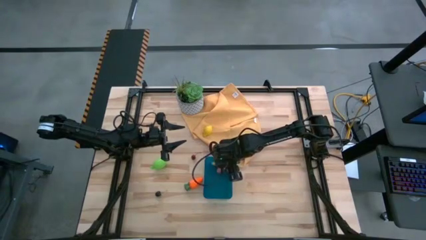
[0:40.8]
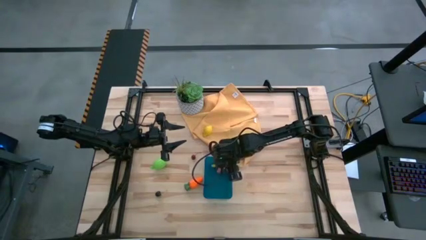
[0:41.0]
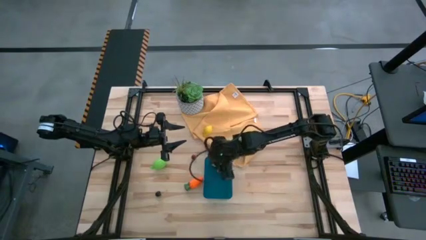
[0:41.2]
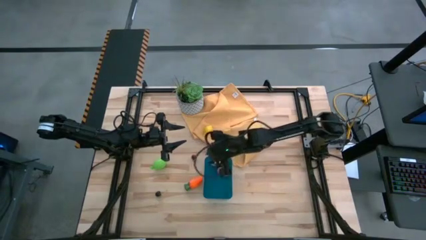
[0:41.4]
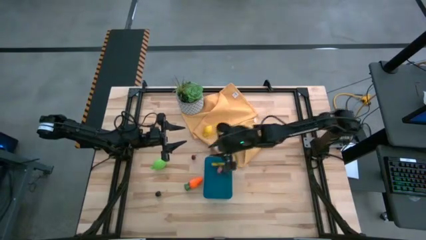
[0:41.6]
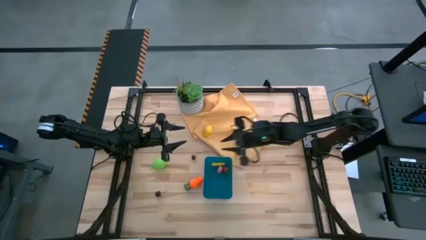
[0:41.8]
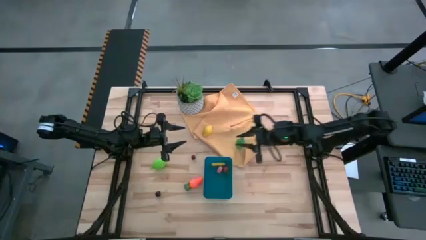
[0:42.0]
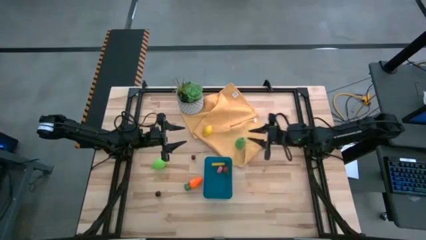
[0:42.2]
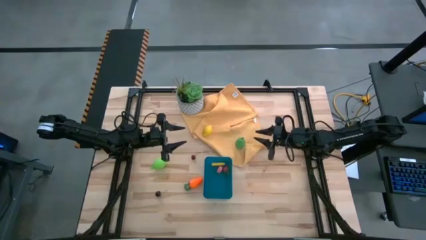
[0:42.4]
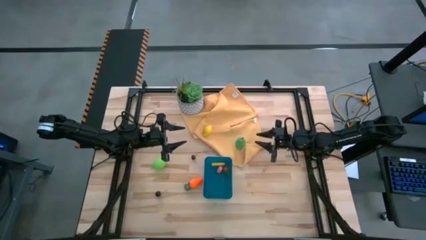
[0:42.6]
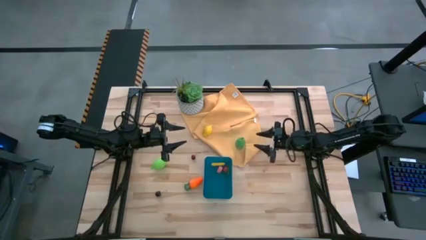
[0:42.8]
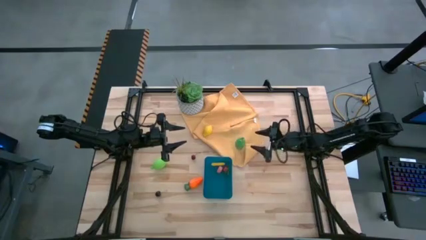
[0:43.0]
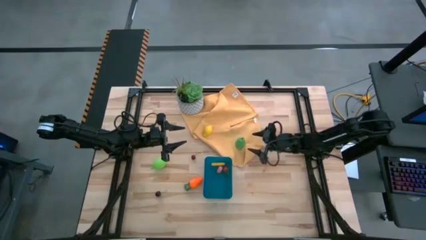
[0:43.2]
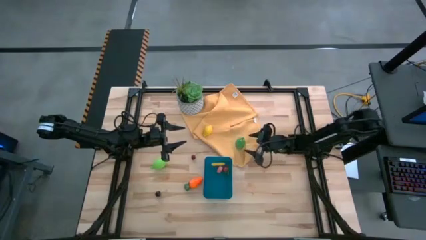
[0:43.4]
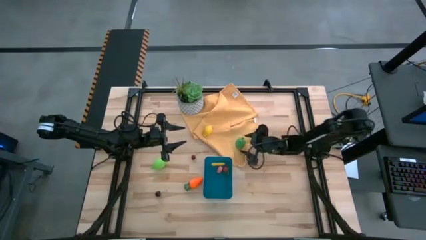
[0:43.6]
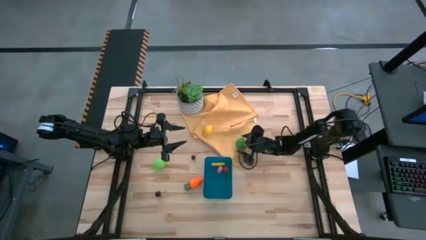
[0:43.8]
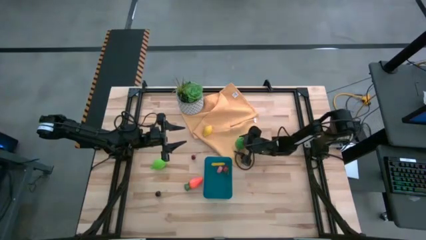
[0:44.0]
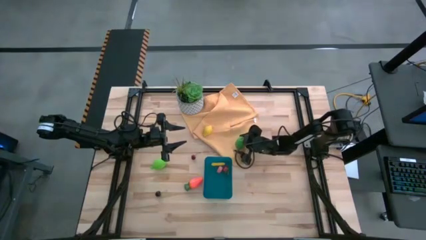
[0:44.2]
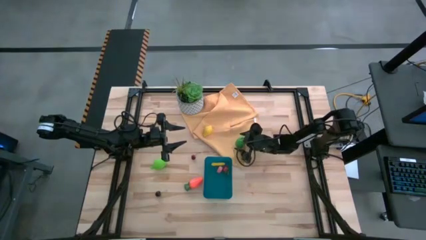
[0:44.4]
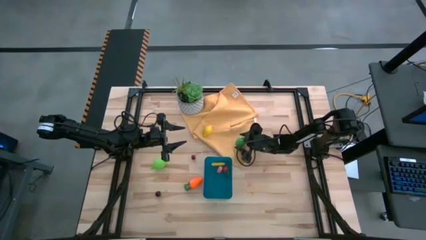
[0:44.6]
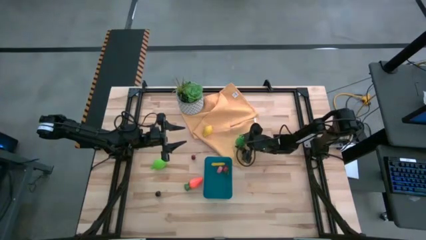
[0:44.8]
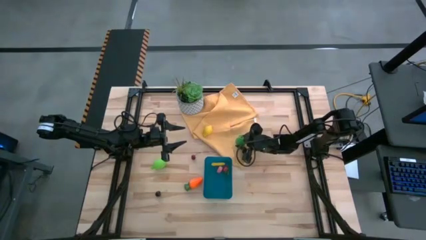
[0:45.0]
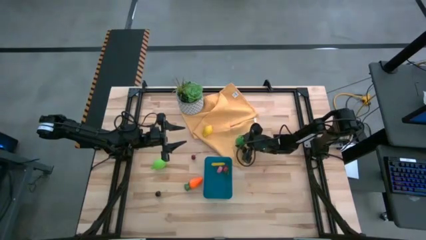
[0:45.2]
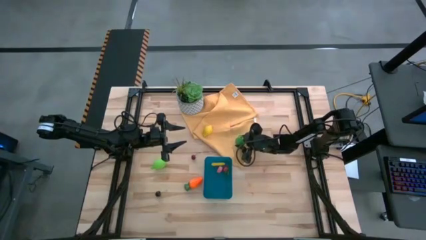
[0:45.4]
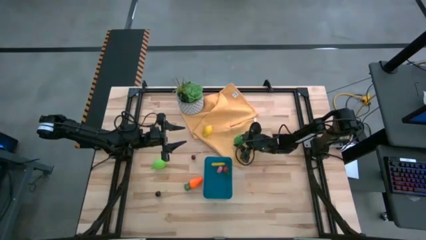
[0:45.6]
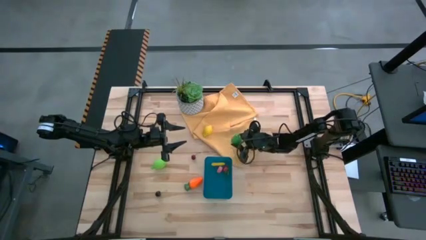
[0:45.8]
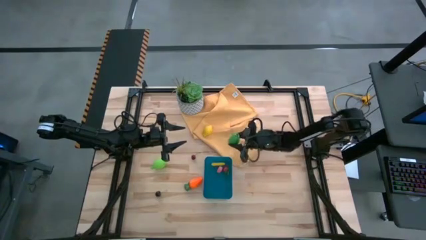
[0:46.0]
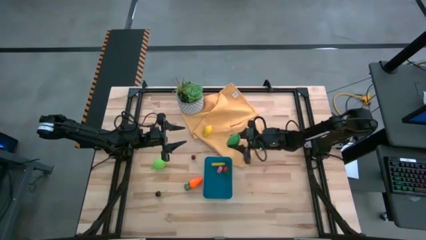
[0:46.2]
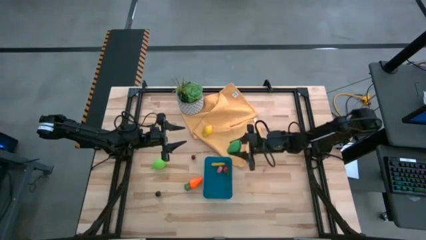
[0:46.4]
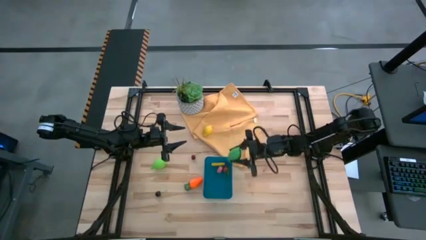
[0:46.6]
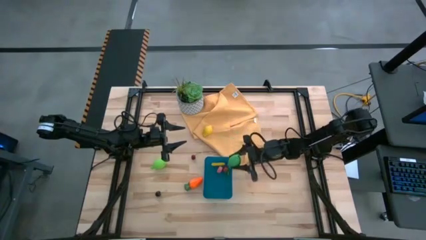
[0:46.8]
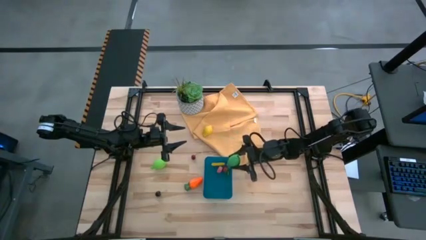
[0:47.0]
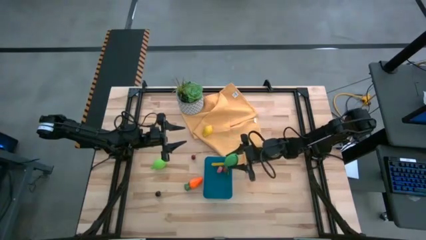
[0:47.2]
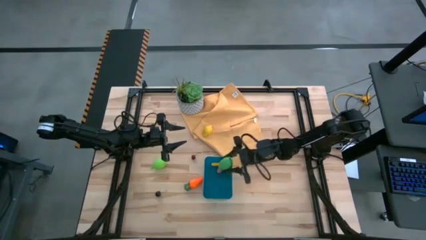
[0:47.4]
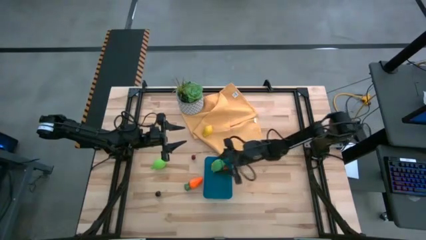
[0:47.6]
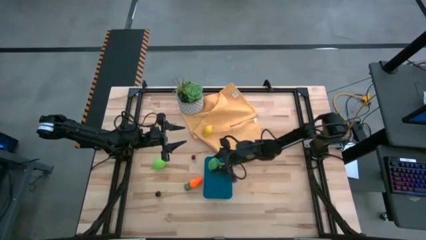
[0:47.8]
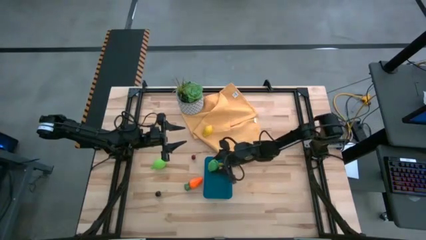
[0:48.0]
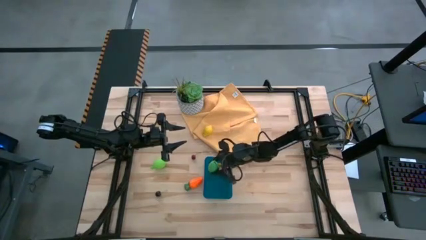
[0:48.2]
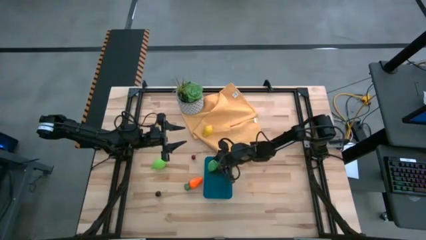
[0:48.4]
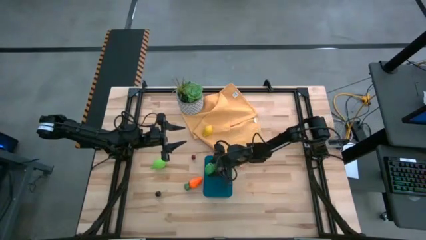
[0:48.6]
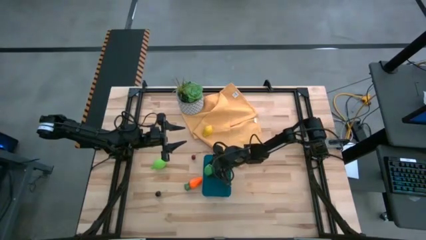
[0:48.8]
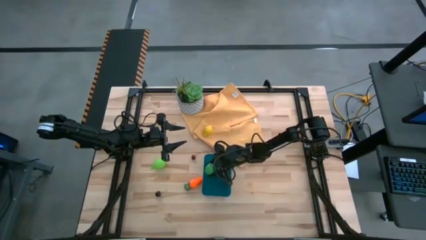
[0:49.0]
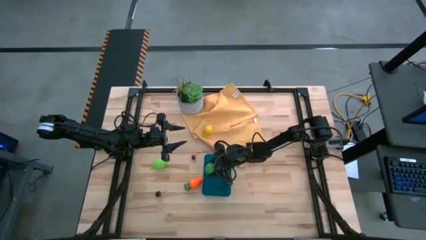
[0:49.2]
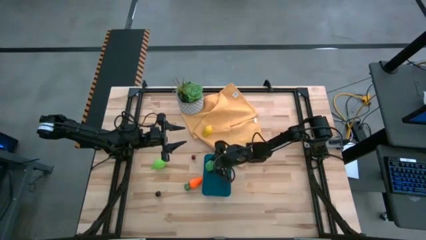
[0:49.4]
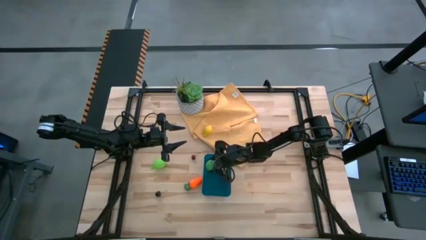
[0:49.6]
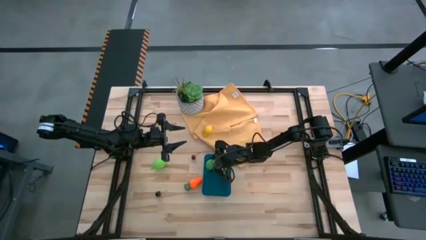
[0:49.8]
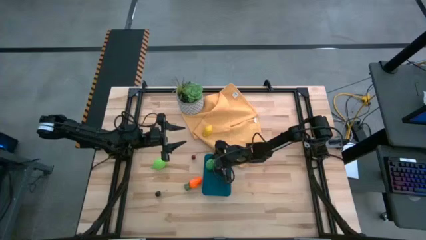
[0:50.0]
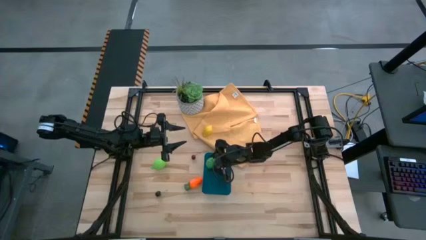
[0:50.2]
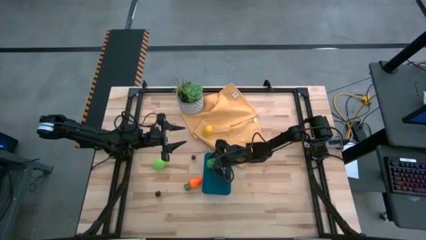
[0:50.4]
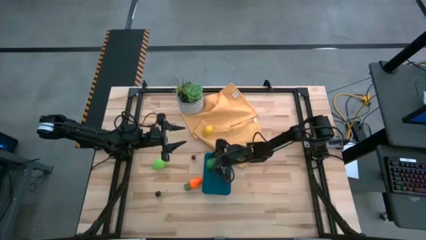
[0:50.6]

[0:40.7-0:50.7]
Task: Pick and placing Produce into tupperware
Put the green corn into the bin

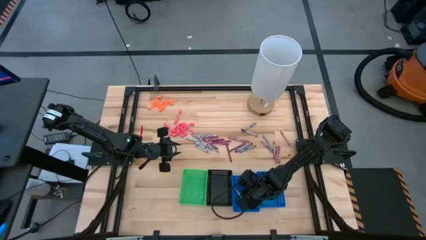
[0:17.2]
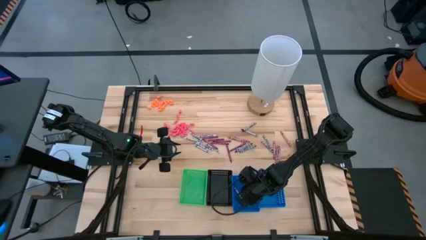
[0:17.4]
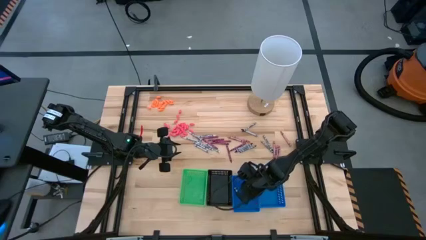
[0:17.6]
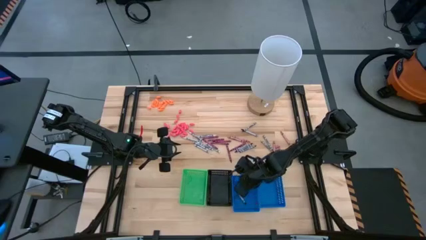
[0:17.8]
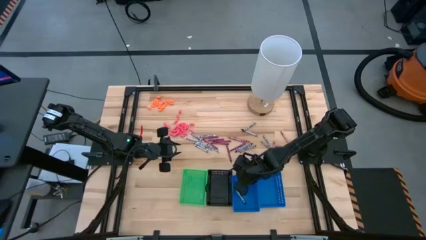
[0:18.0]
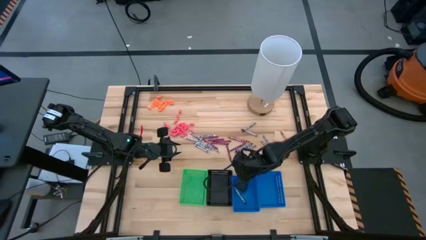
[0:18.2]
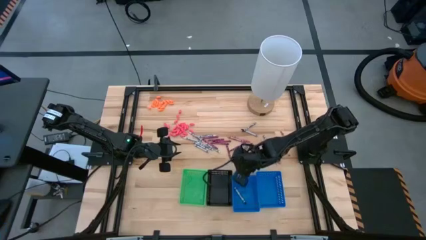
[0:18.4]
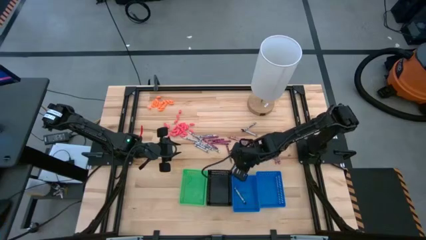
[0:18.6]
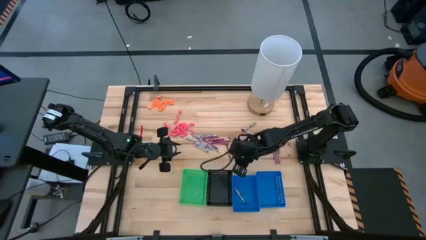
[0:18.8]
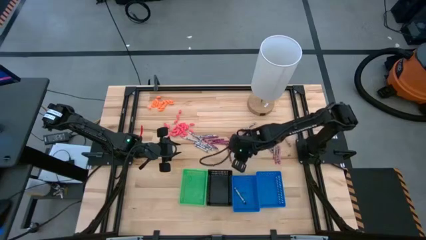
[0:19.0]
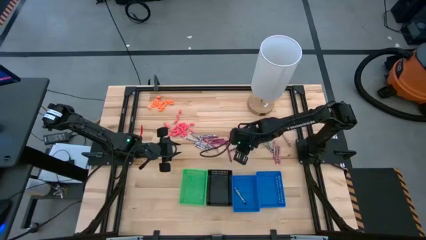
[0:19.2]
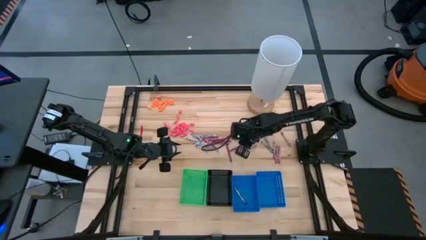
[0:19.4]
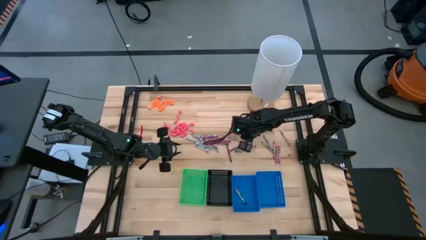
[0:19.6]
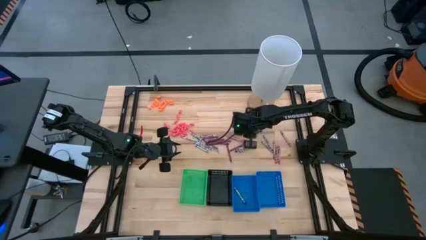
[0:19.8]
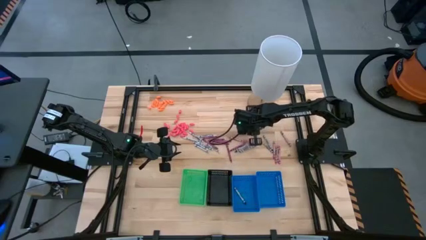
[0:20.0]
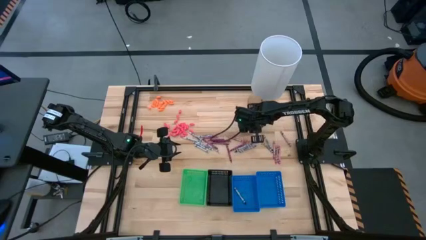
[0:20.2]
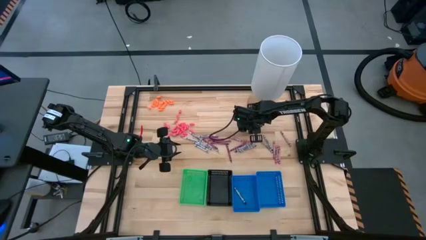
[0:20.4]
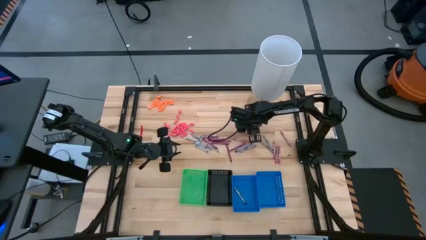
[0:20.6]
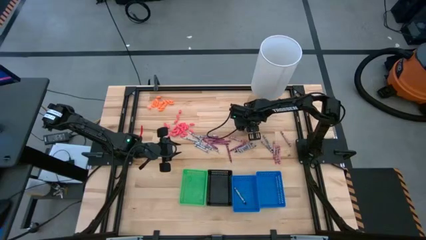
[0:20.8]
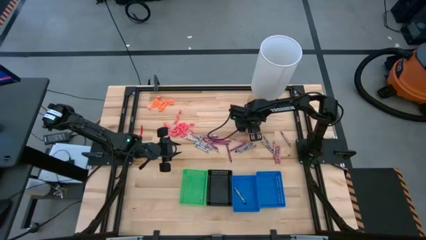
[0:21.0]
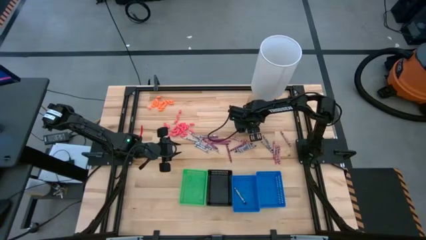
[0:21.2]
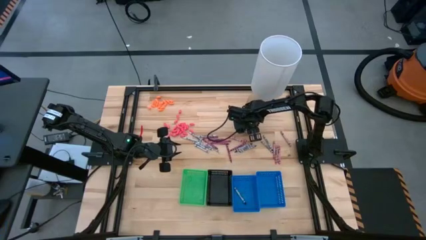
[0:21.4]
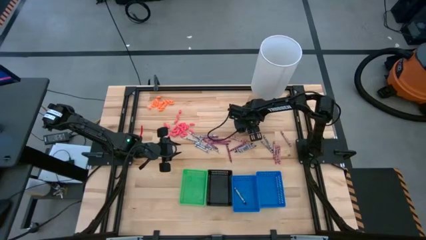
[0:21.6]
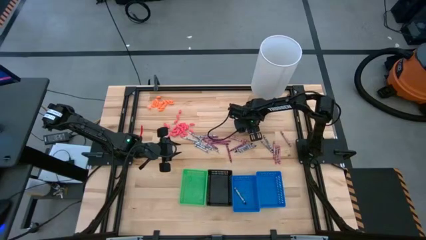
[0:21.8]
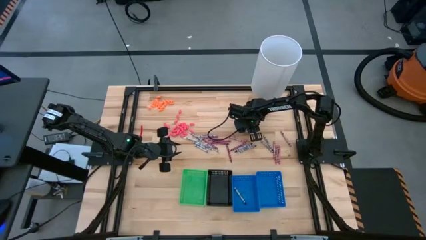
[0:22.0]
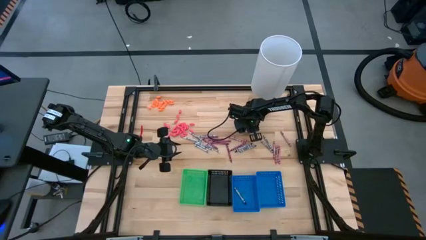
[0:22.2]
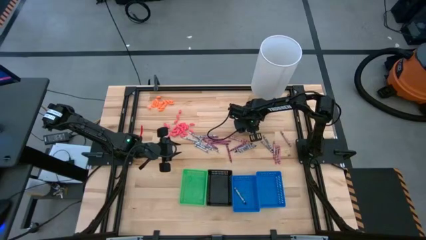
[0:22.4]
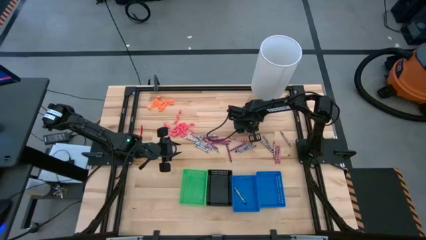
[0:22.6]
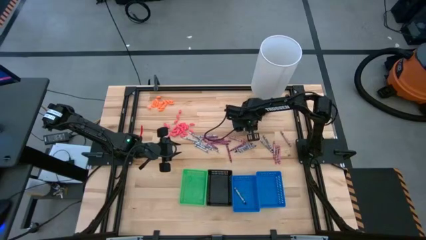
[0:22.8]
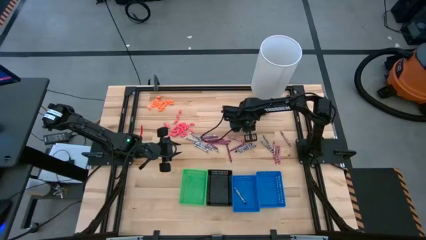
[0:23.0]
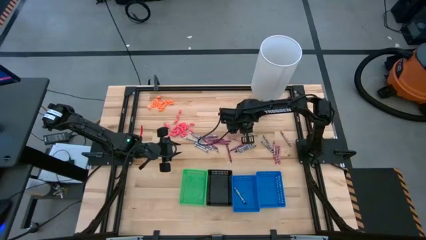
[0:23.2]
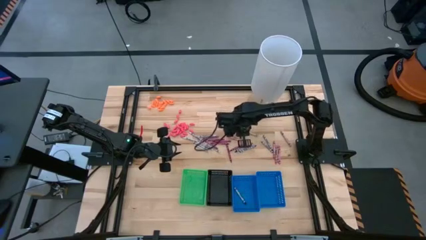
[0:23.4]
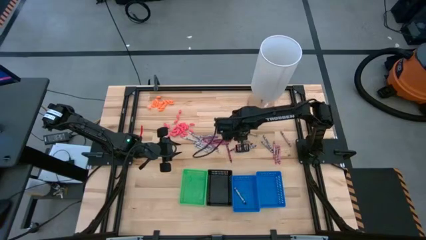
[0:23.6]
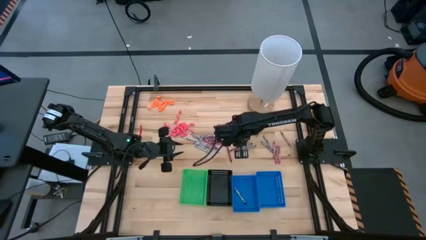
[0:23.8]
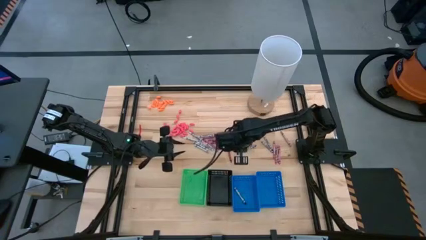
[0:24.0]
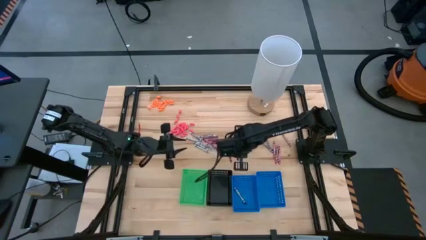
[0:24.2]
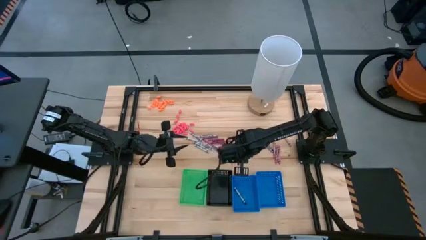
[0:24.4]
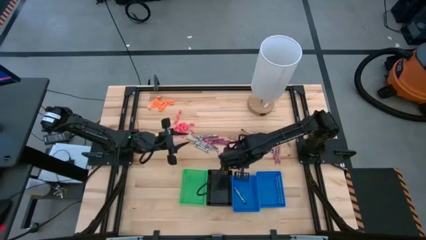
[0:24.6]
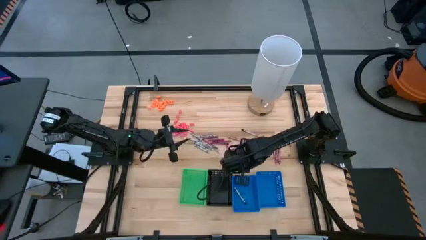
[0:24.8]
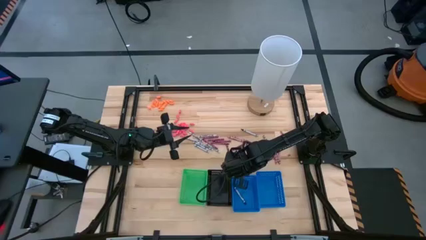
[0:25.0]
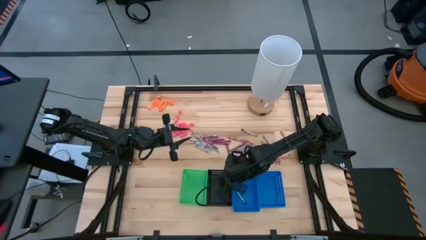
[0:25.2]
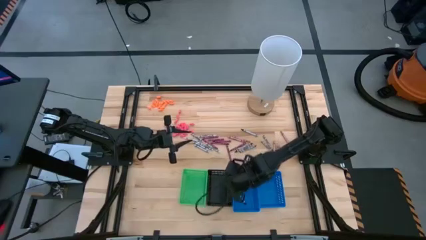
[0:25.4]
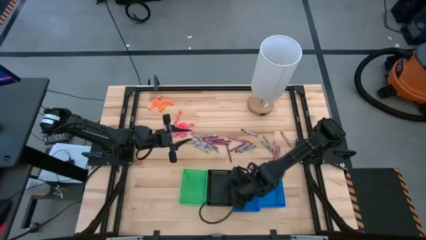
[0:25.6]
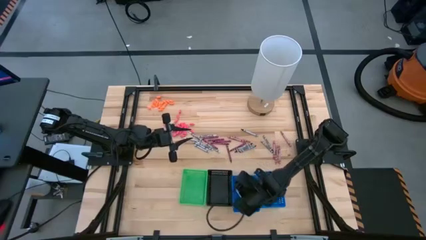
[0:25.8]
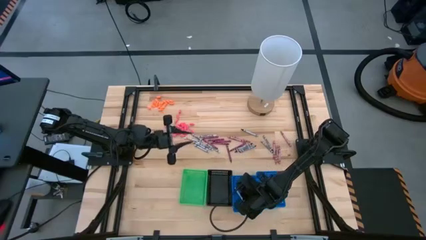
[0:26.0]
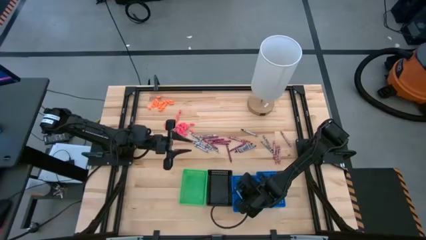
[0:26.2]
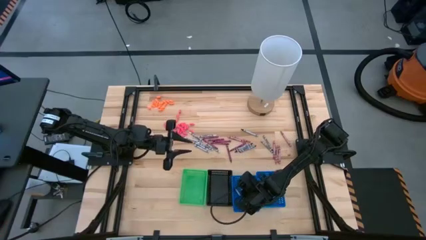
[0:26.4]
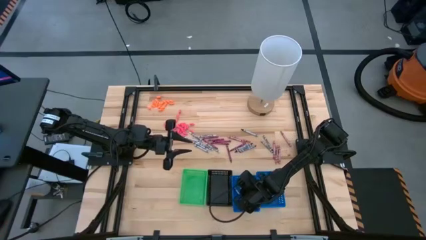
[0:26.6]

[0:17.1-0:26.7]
Task: Sort crayons
Put the black crayon into the left blue bin
